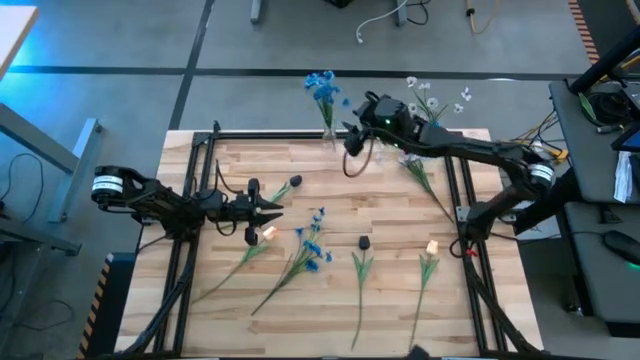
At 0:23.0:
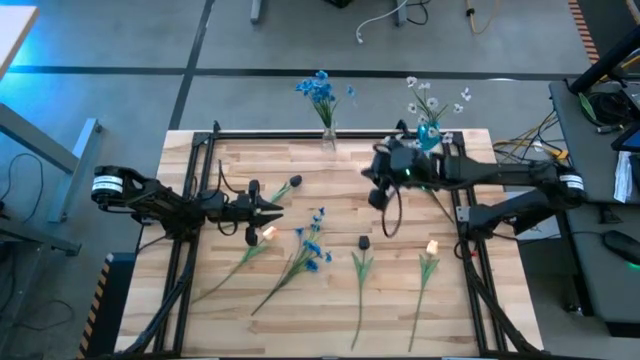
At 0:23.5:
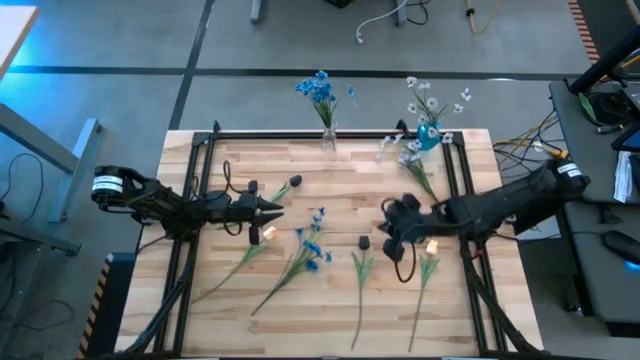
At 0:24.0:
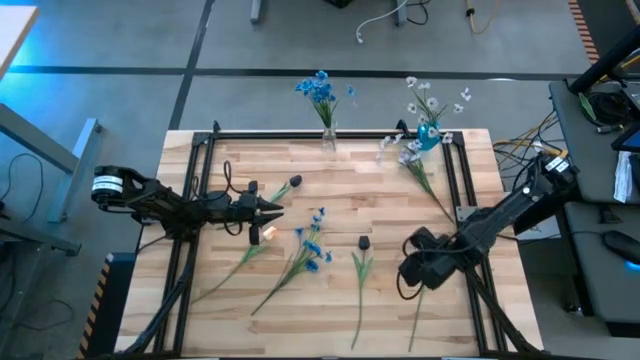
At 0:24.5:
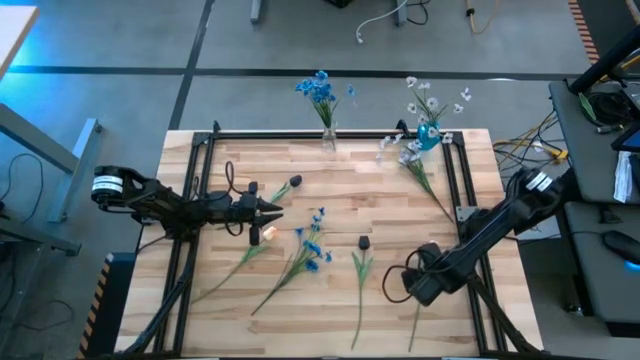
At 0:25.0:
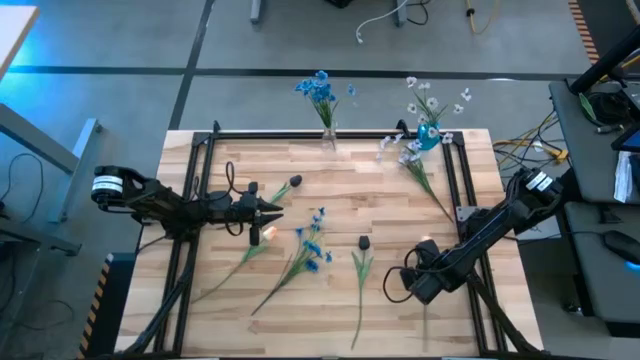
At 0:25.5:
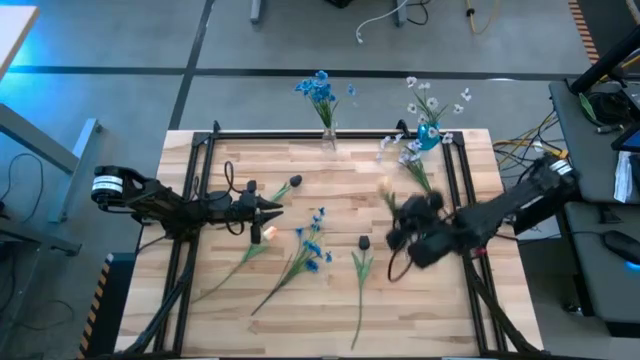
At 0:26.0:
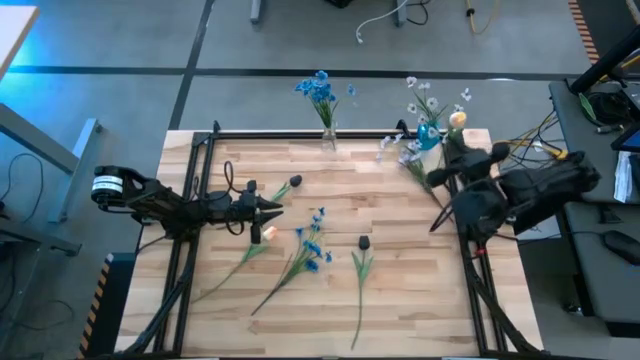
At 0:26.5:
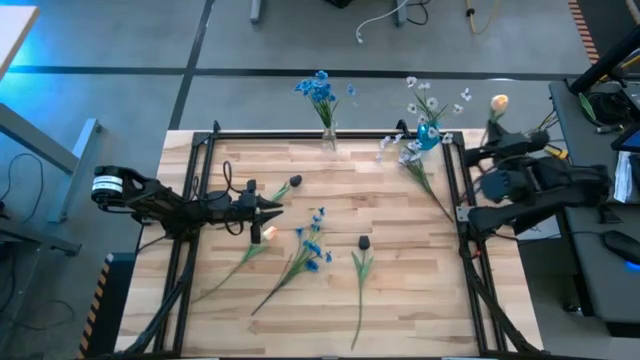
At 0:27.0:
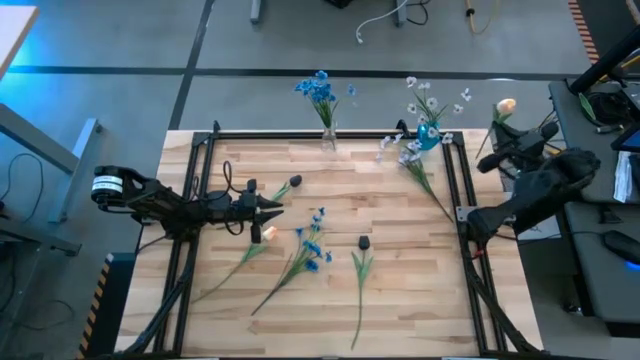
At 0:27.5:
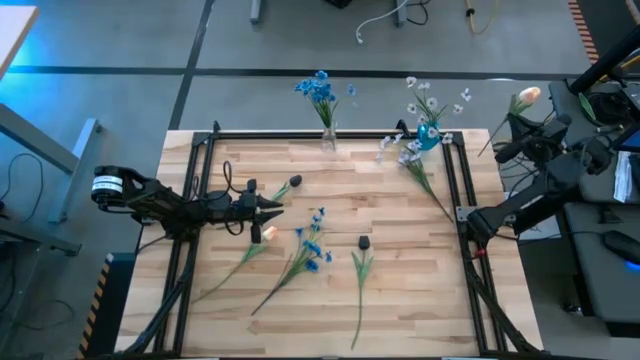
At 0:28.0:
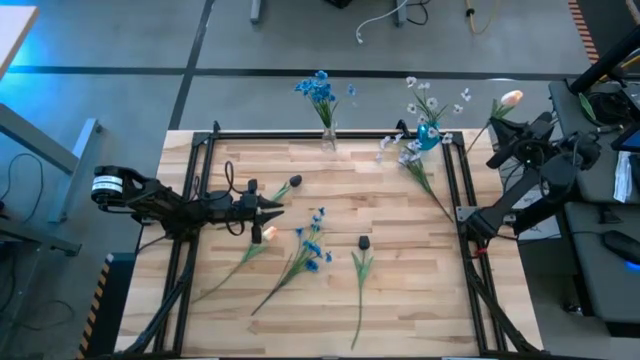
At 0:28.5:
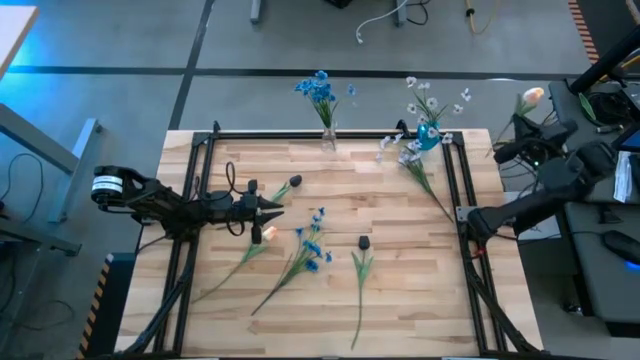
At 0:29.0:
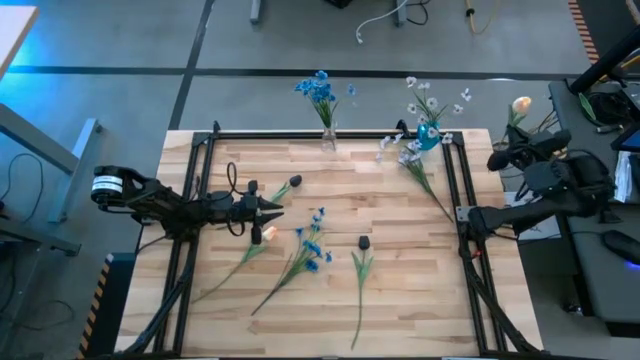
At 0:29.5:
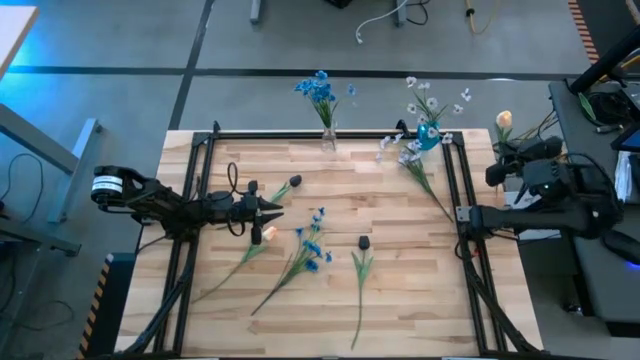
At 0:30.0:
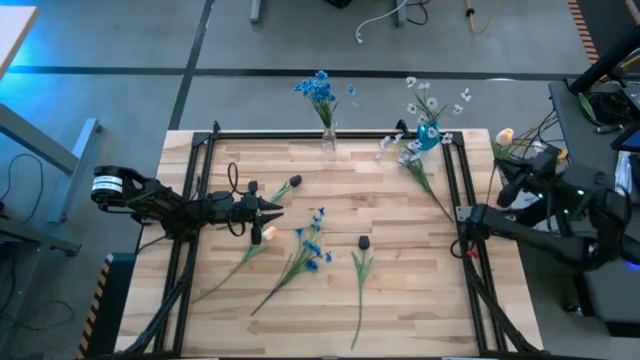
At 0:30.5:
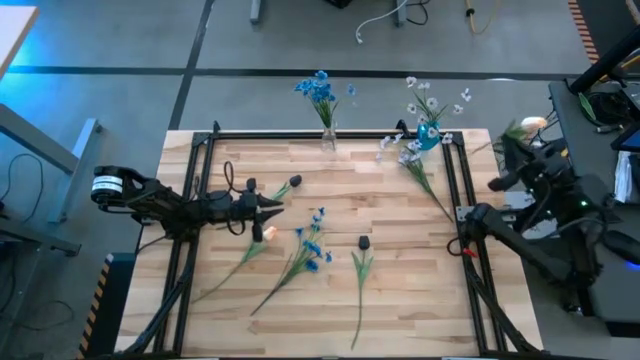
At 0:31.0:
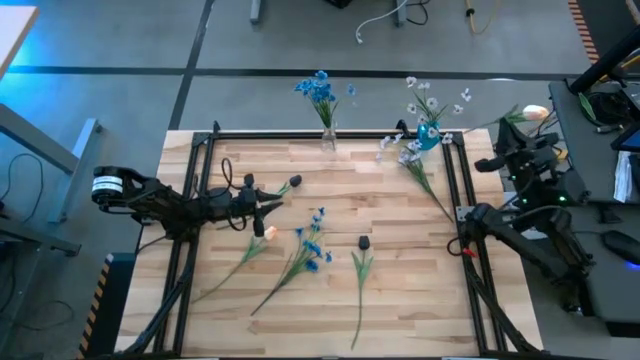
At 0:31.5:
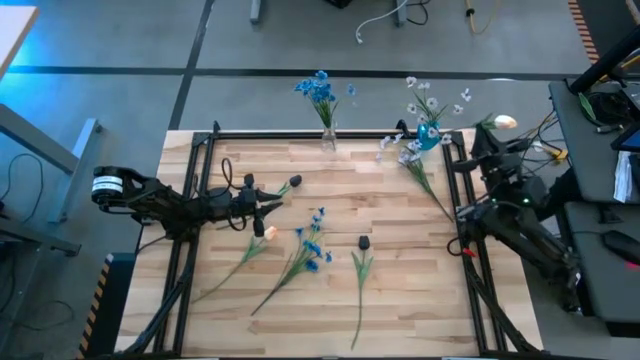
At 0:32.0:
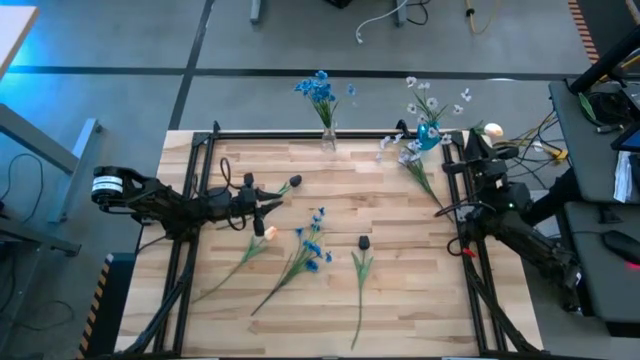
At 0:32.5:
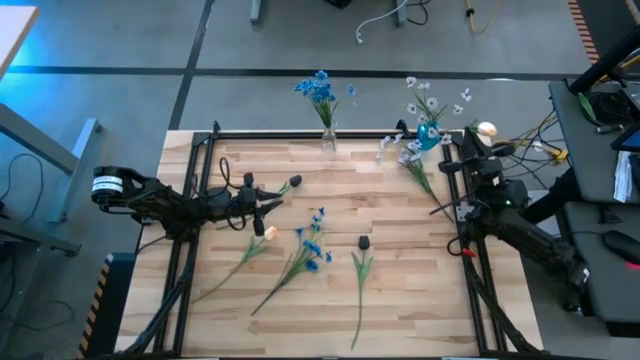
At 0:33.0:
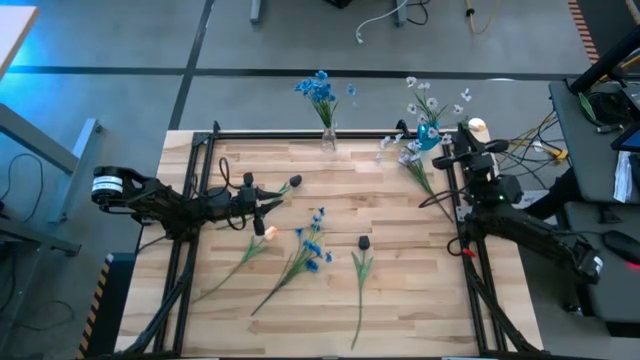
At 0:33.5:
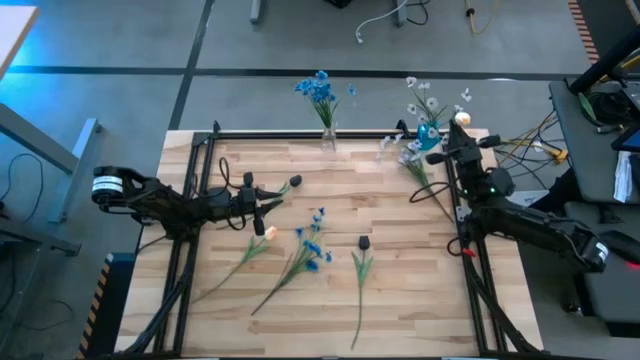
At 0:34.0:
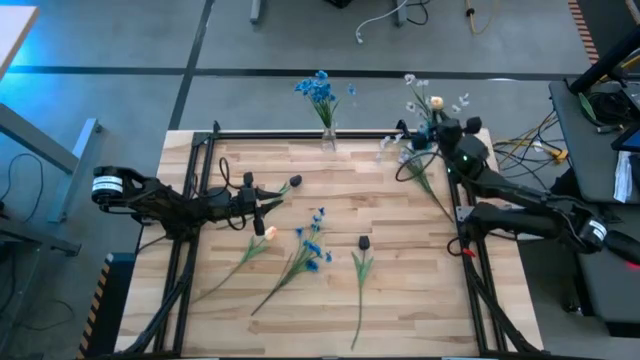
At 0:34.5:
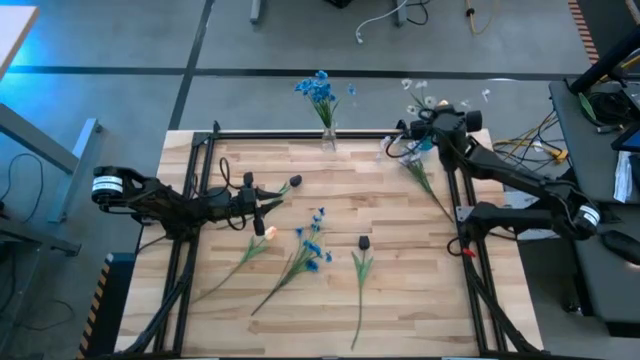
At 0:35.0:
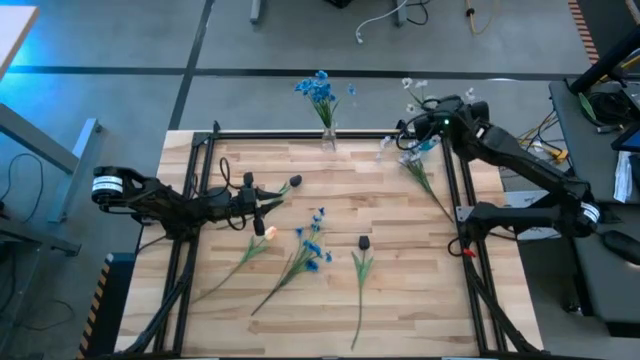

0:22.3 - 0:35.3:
Task: Sort flowers into vase by color
Put the right light orange tulip into the blue vase

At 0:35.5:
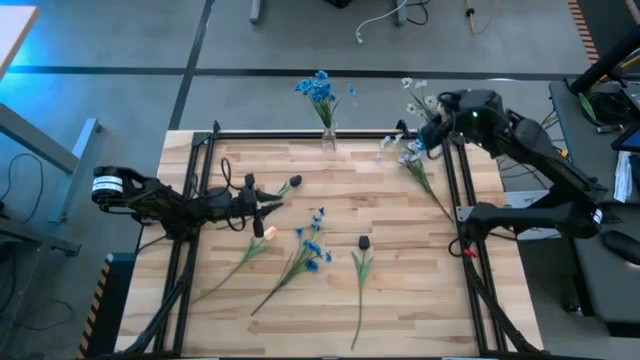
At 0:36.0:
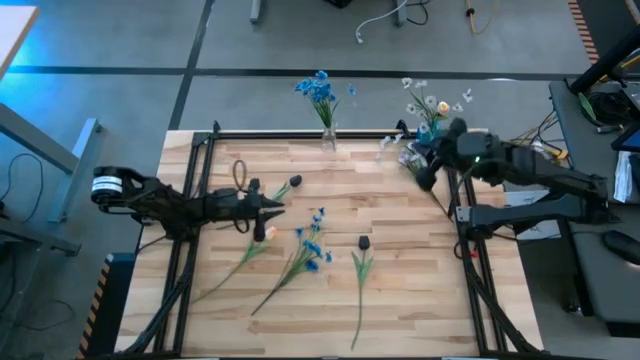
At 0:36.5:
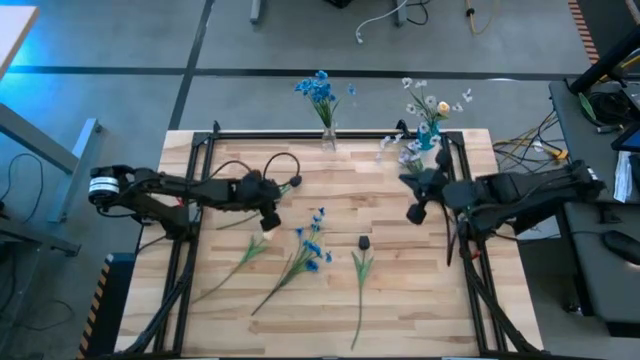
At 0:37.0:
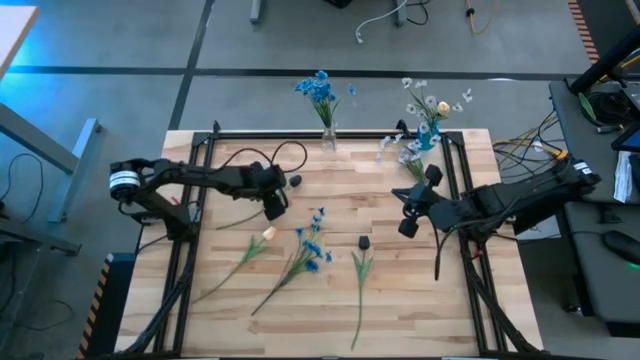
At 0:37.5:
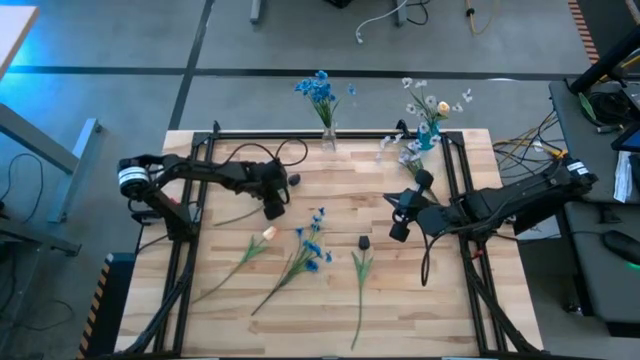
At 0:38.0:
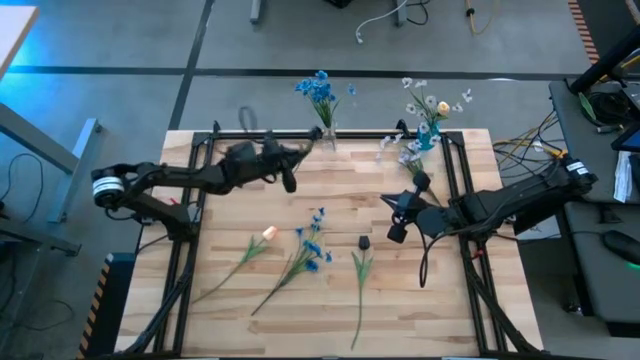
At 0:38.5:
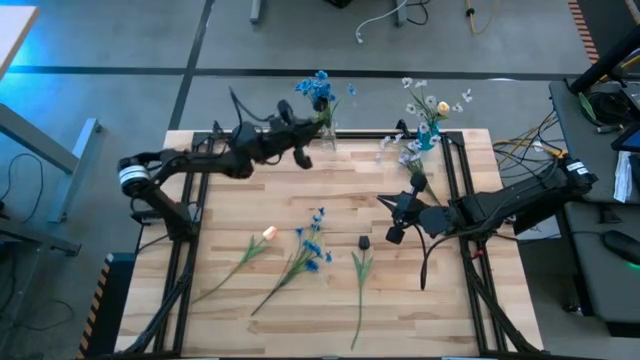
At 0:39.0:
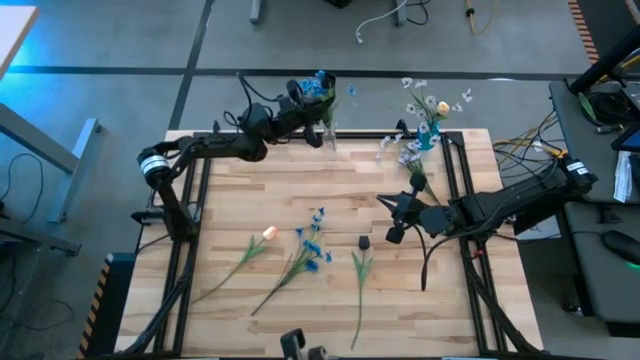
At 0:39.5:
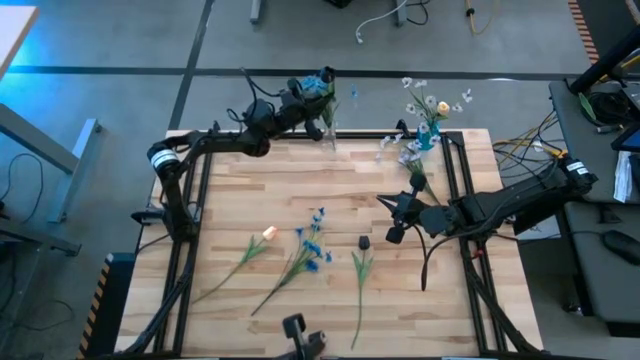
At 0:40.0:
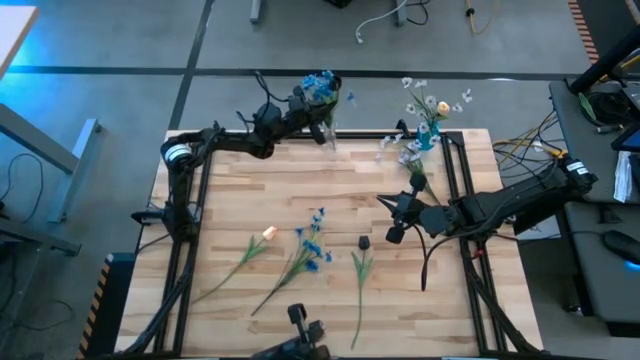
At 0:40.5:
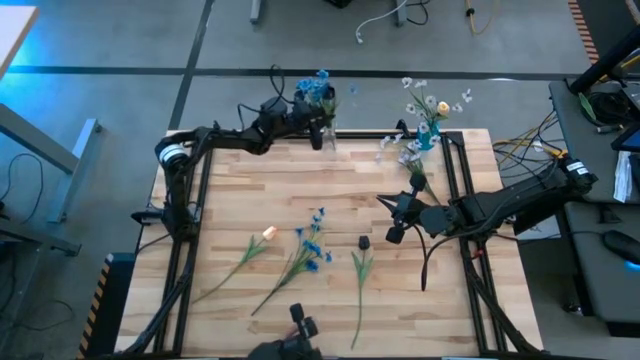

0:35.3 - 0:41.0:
Put the top black tulip into the transparent vase

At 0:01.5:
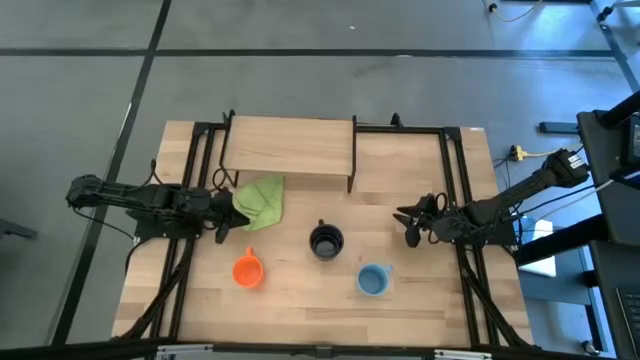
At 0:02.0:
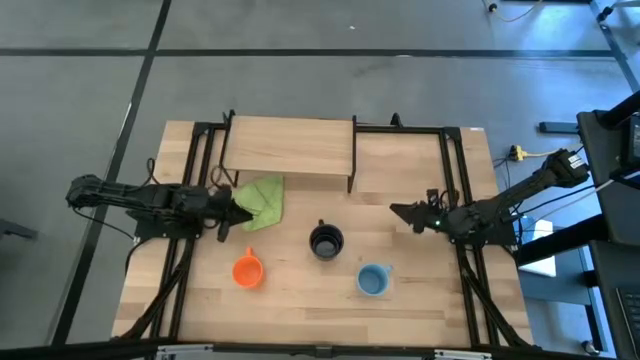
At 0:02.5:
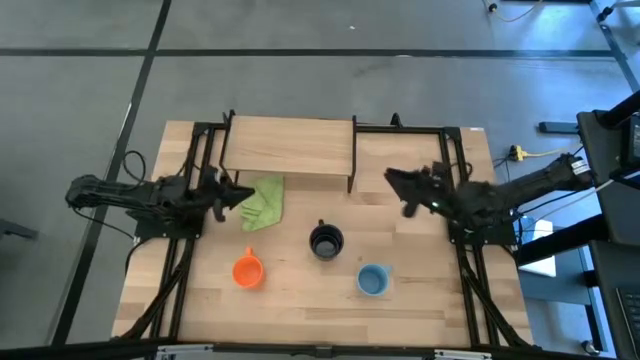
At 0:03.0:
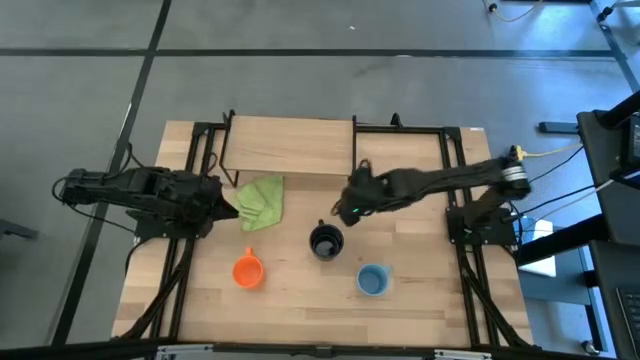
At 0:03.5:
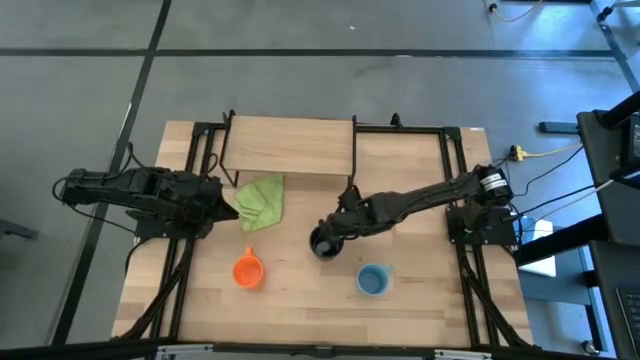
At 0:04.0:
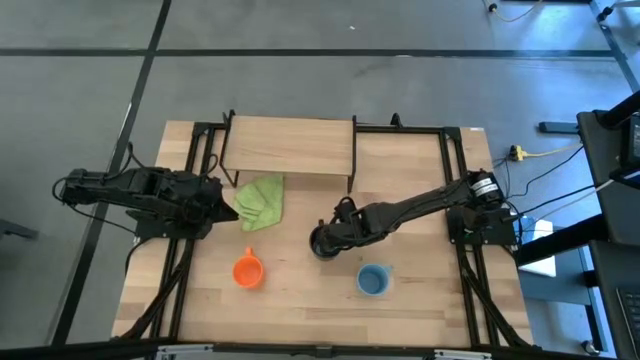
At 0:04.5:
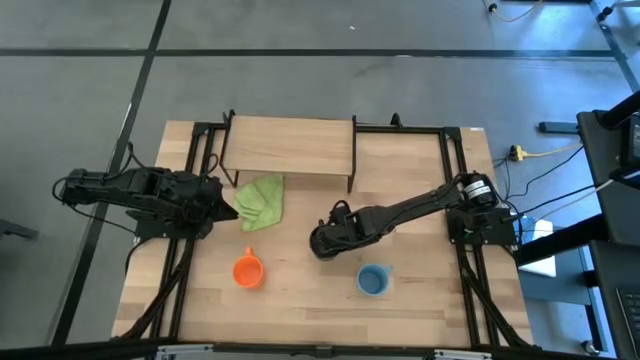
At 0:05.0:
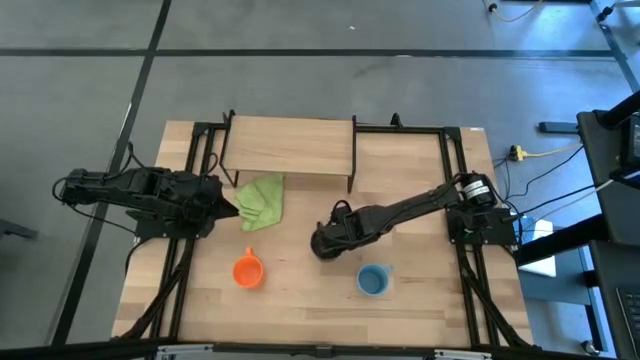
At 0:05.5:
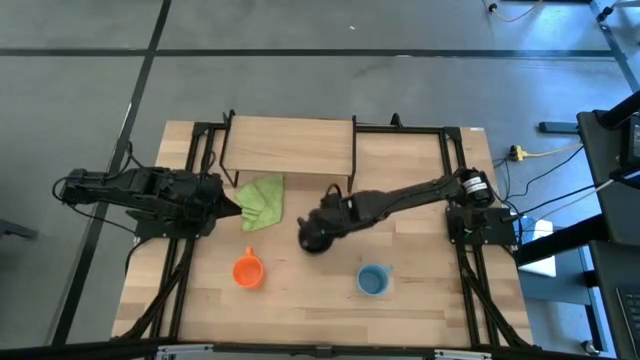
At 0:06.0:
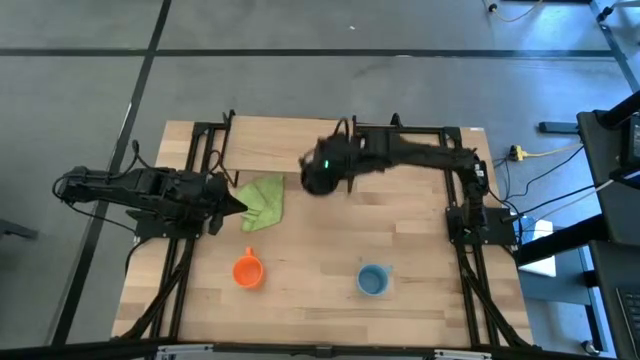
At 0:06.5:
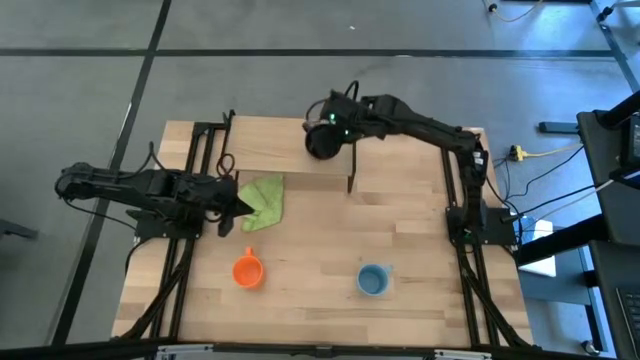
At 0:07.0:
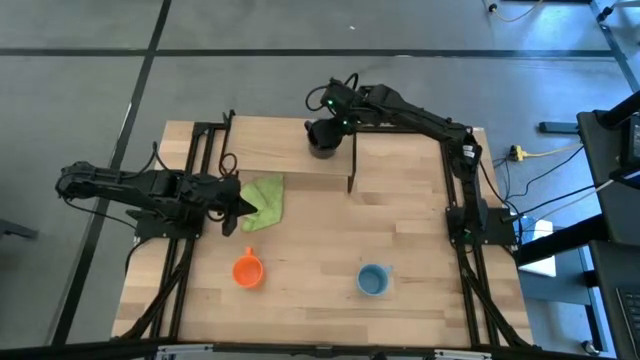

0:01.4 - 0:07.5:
Task: Stack small to large cups/mugs on shelf
Put the black mug on the shelf
